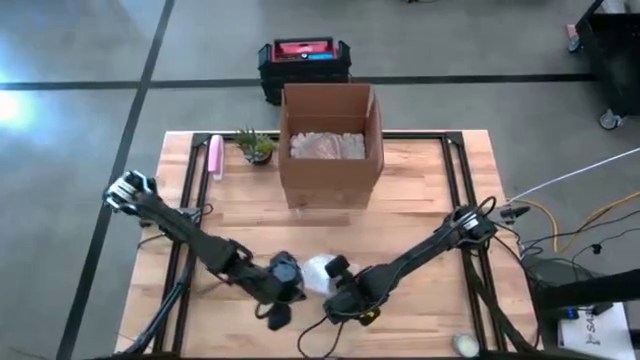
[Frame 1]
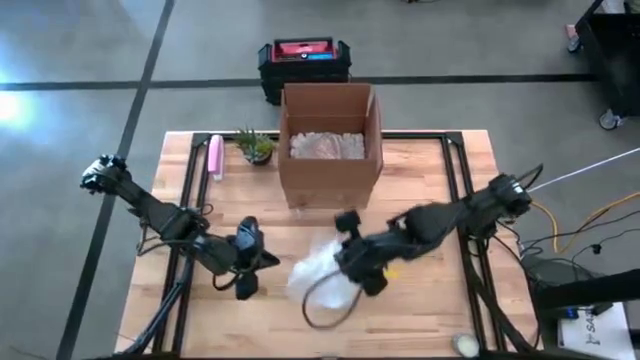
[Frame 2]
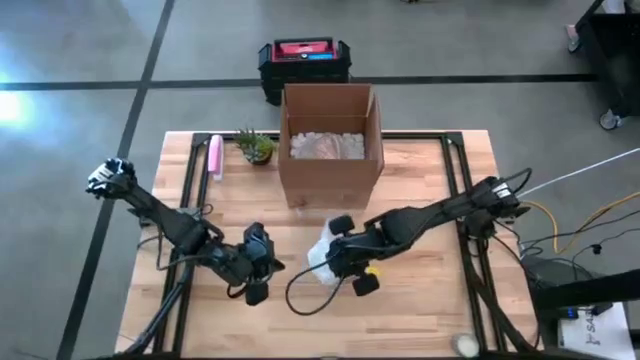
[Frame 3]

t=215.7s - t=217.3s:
Task: wrap mug
Wrap the gray mug with the bubble wrap

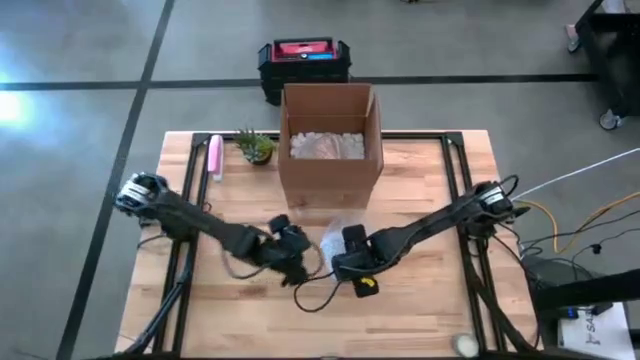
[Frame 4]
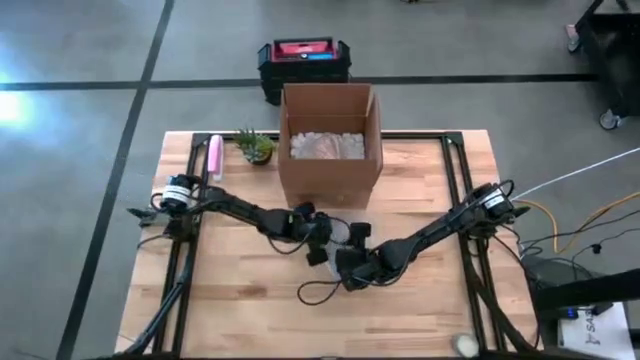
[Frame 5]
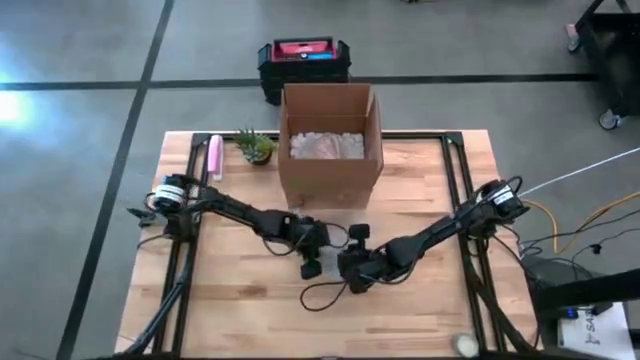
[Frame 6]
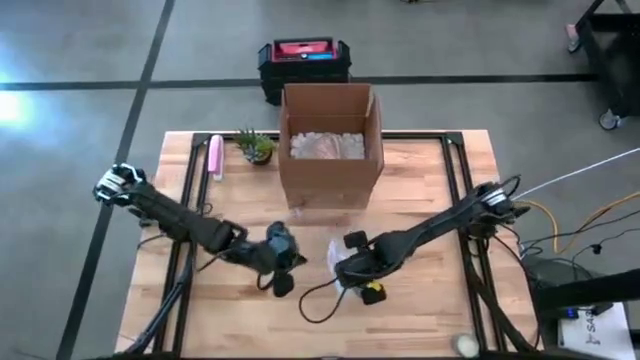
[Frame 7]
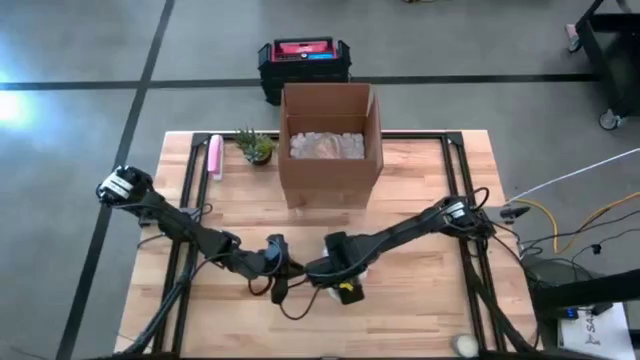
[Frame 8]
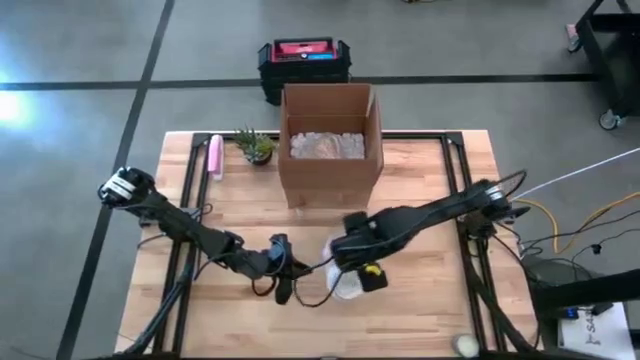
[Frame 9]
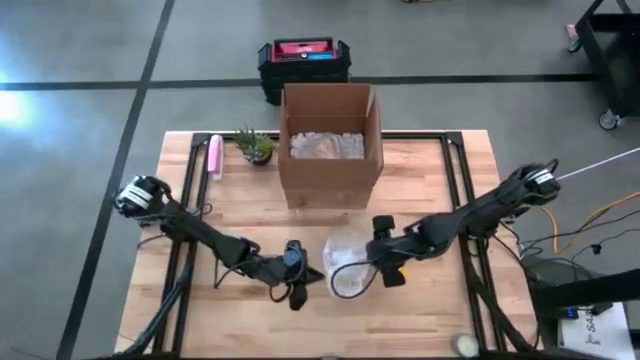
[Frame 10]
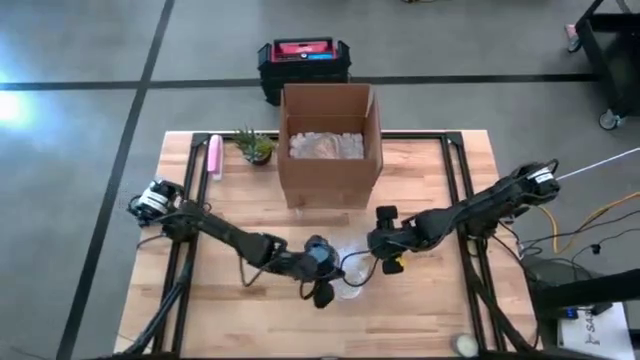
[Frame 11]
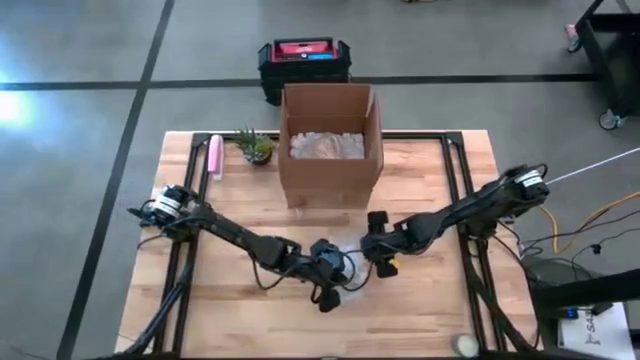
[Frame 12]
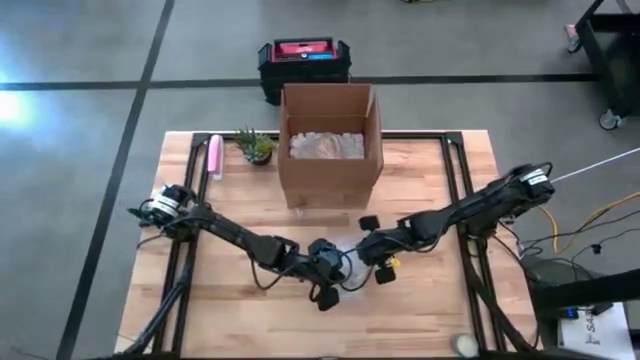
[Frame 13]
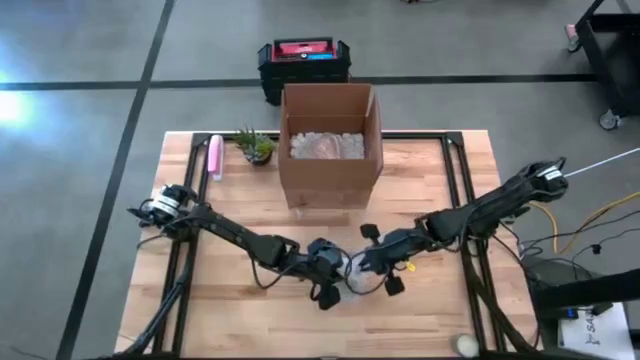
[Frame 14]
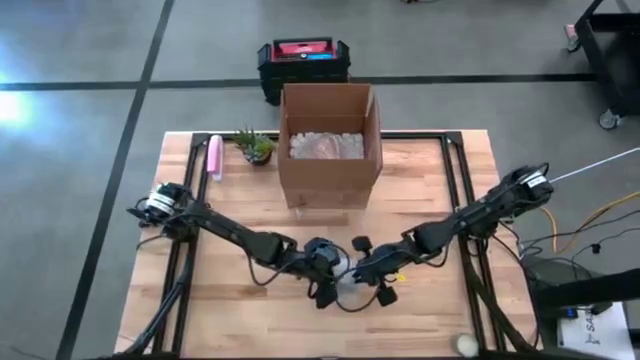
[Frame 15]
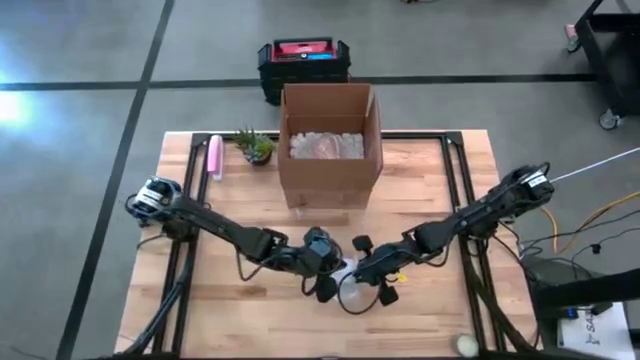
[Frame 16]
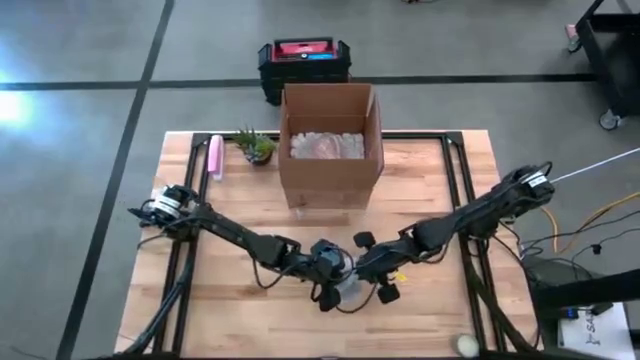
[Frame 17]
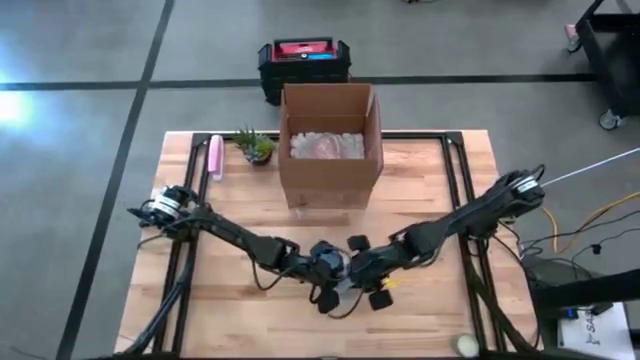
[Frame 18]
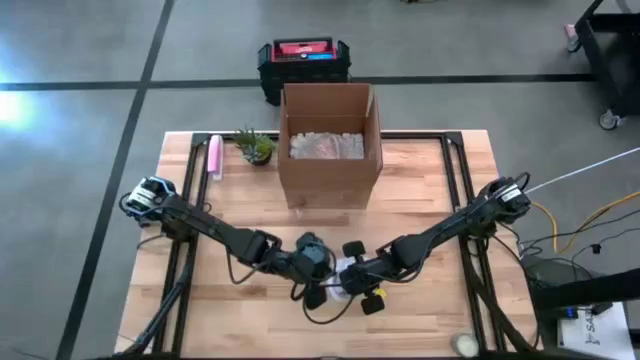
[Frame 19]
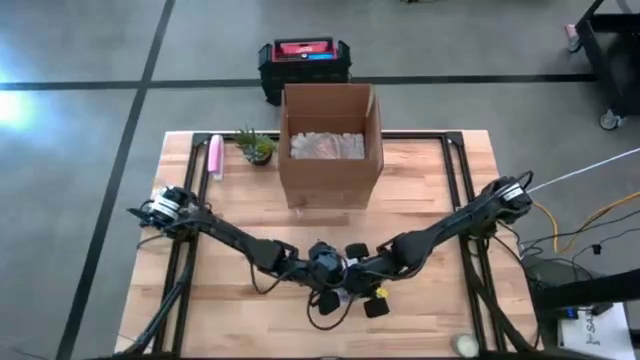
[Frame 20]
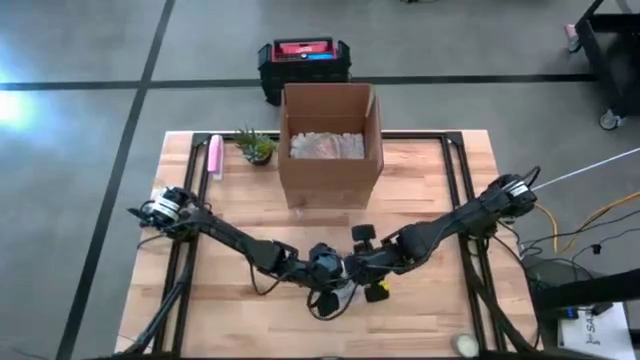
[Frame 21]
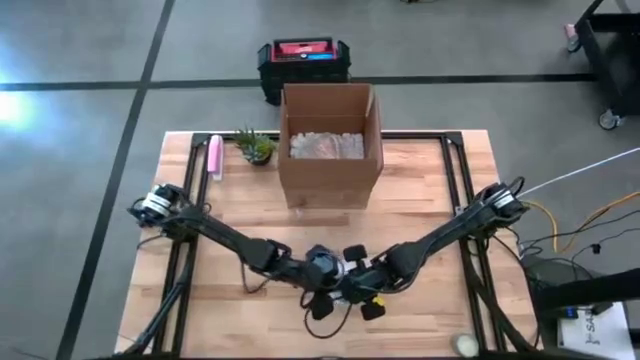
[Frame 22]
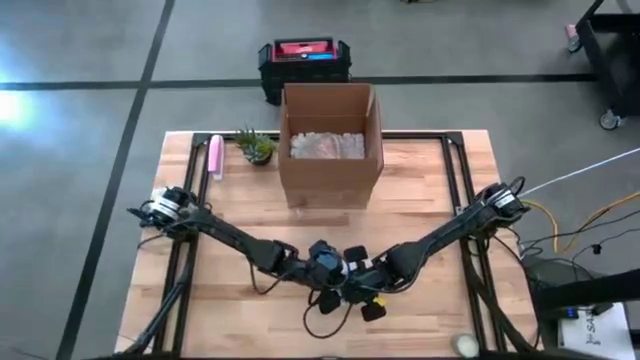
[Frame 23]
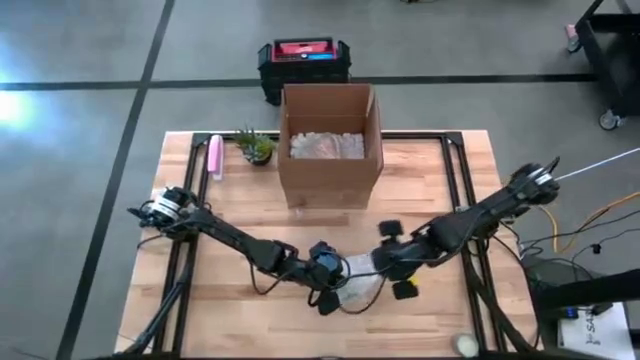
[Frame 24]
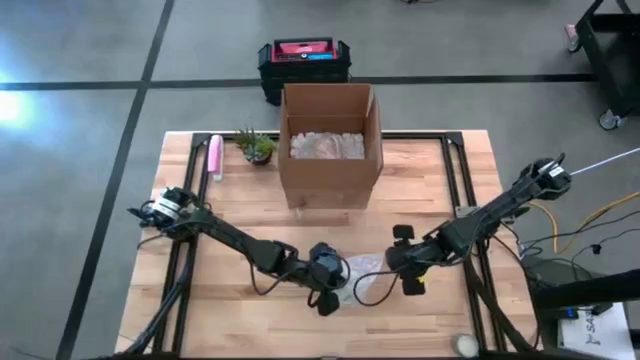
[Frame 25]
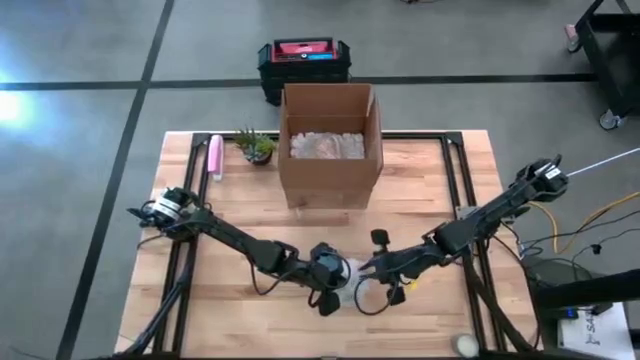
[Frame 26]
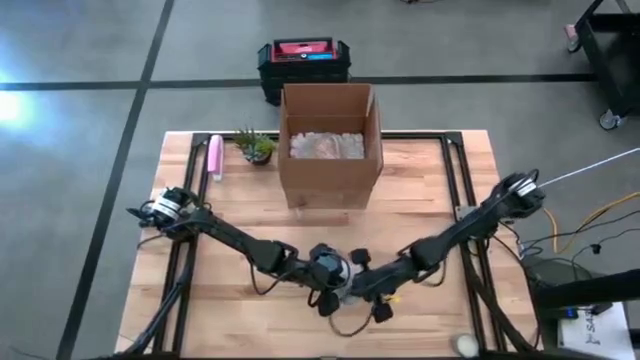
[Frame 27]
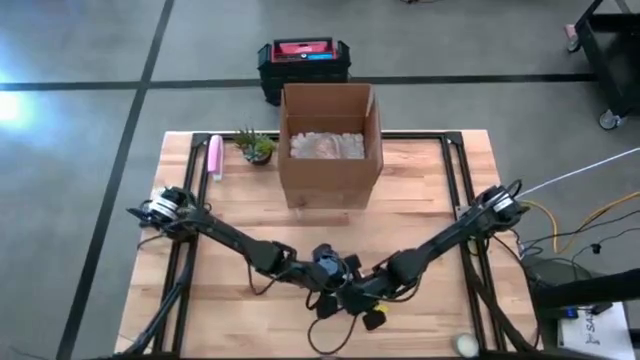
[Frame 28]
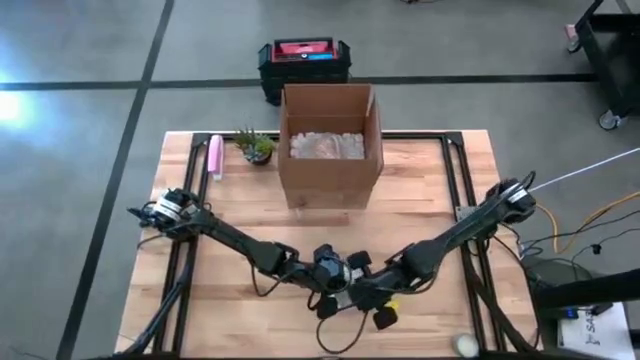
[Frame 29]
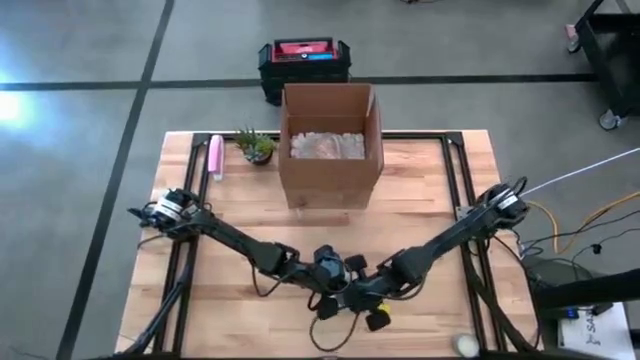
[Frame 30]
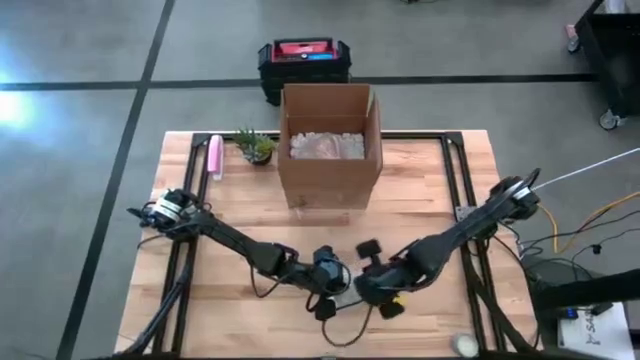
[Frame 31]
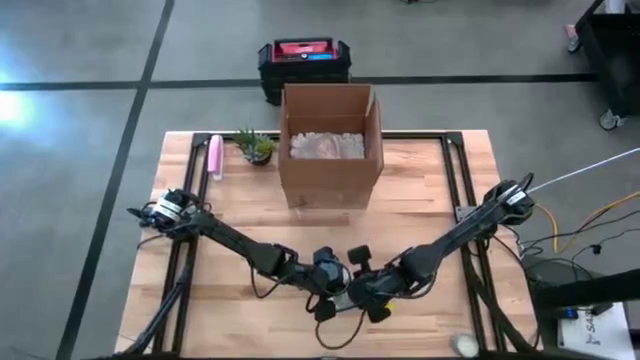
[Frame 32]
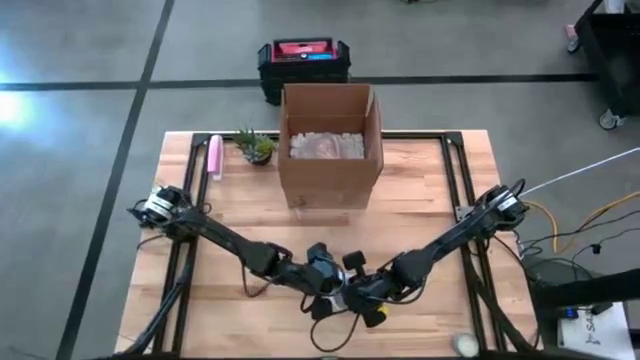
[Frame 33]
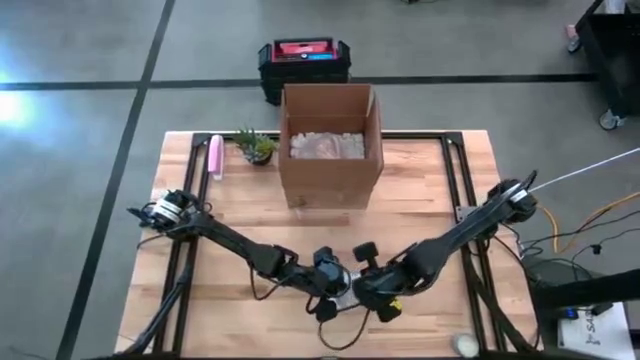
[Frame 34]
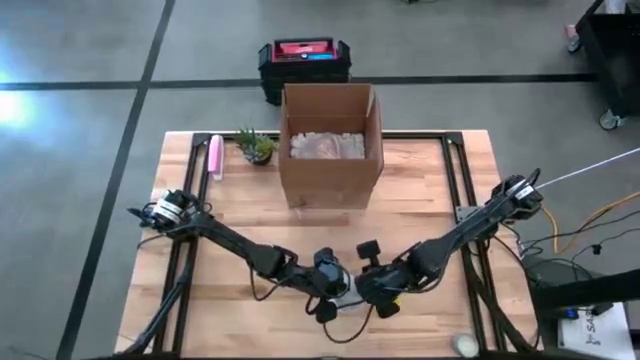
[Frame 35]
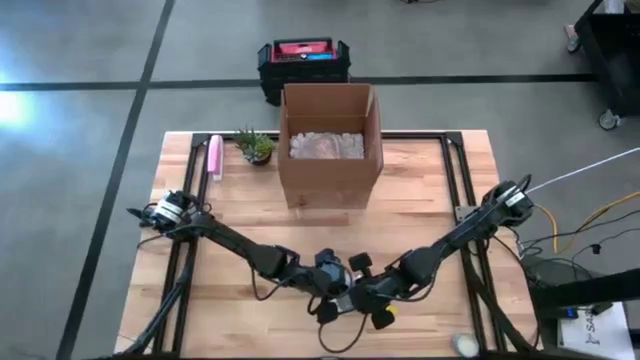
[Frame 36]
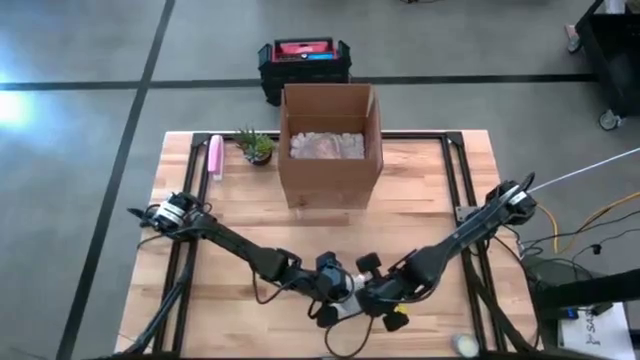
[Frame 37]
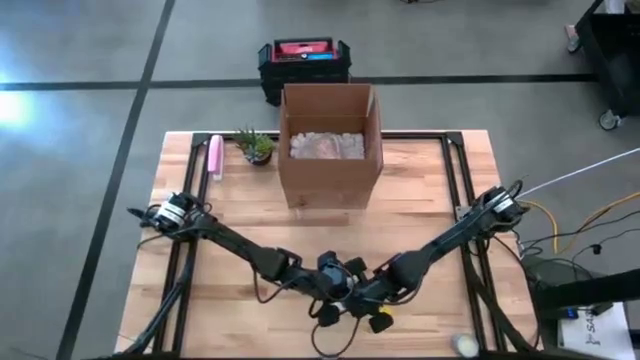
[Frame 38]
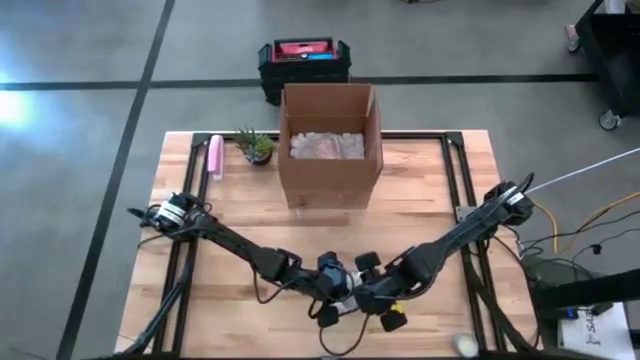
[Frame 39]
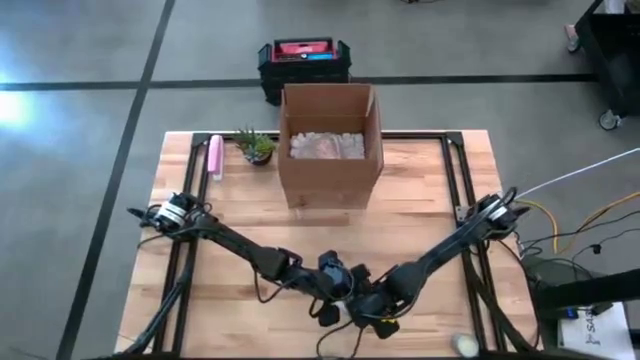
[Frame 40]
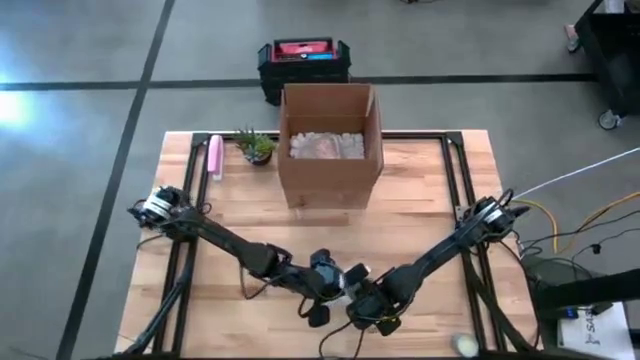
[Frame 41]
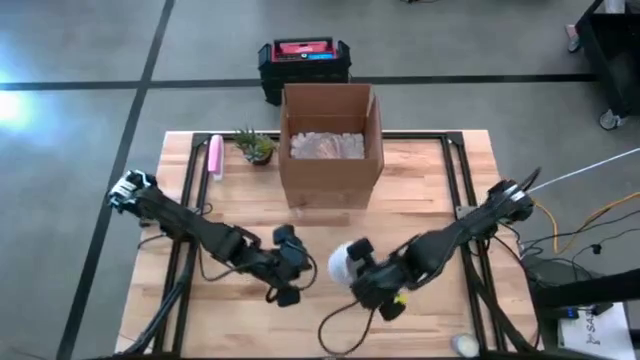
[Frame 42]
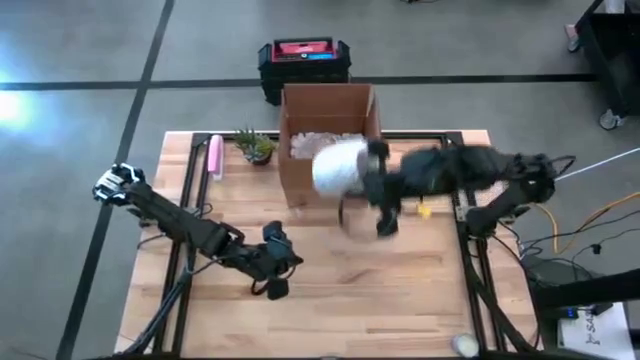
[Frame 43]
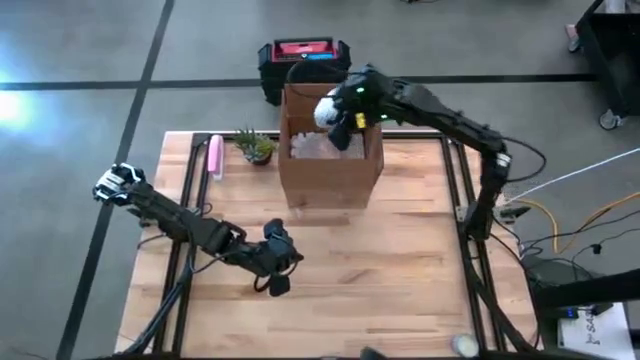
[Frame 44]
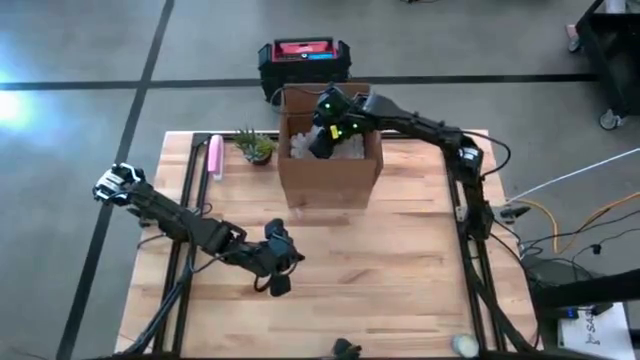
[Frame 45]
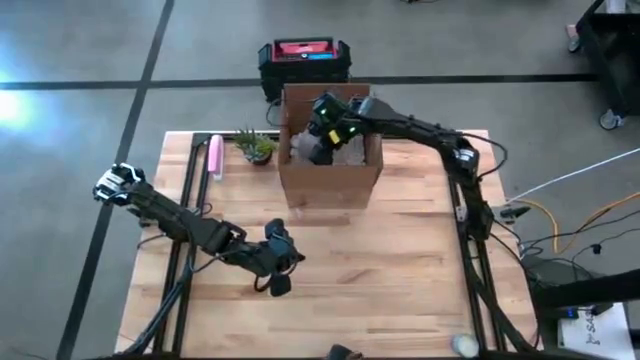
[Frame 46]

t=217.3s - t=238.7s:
Put the wrapped gray mug into the cardboard box
